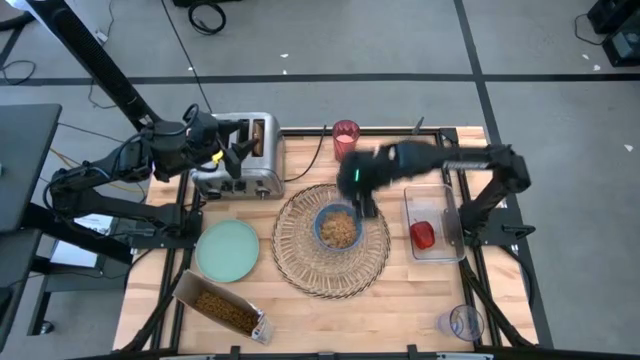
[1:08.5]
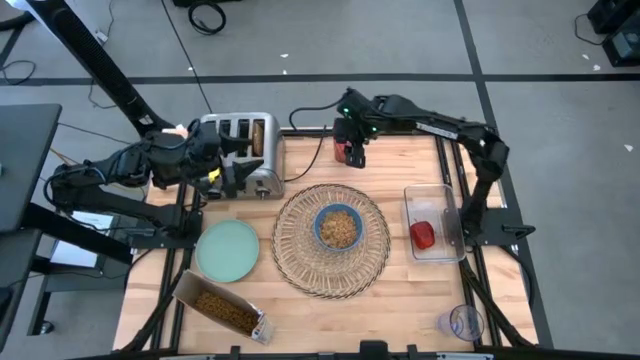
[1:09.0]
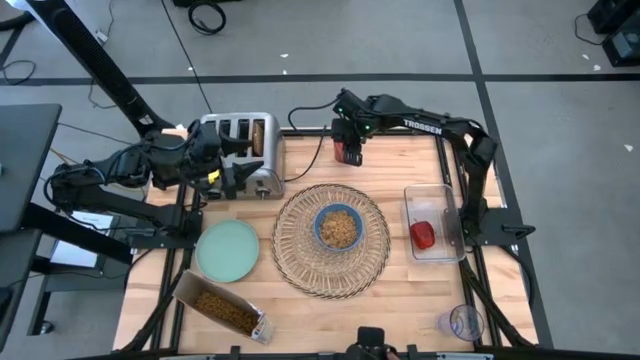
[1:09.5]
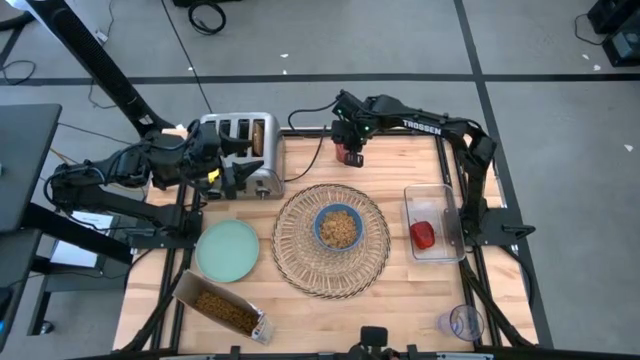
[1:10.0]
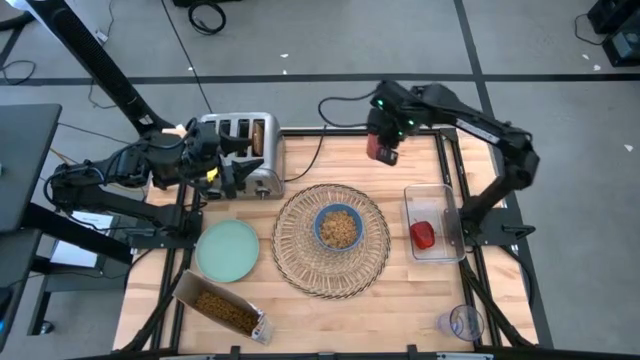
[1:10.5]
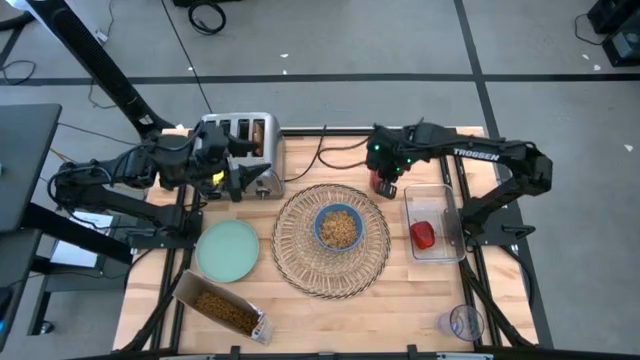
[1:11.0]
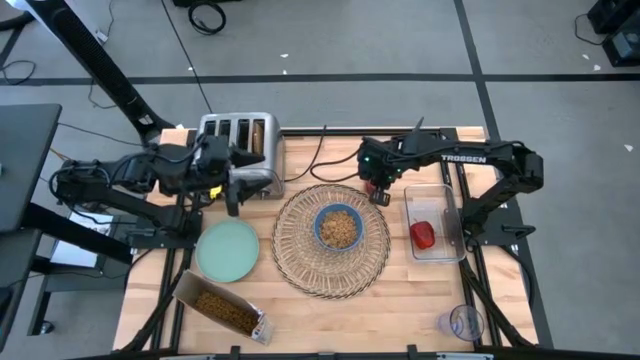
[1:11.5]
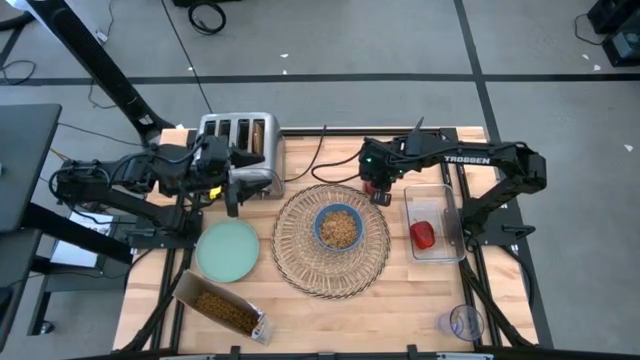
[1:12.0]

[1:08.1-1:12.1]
Task: Arrange a breakfast setting
Put the red glass of milk to the top right of the blue bowl

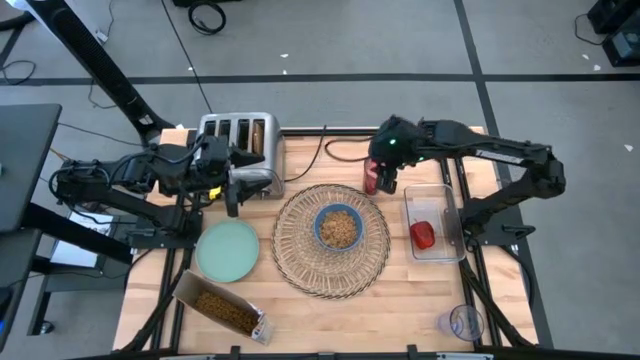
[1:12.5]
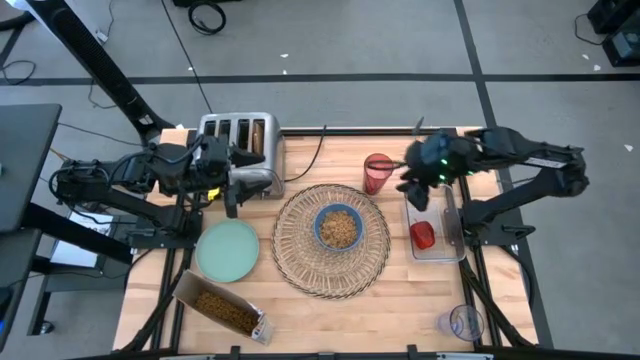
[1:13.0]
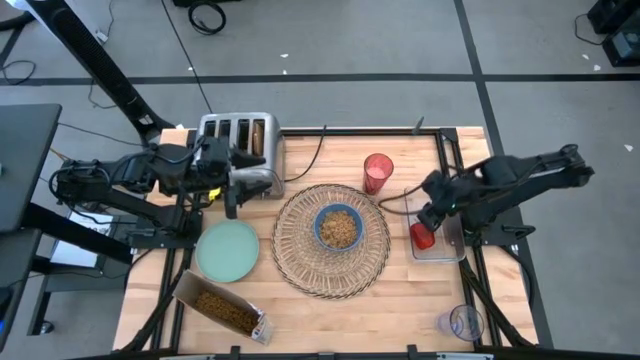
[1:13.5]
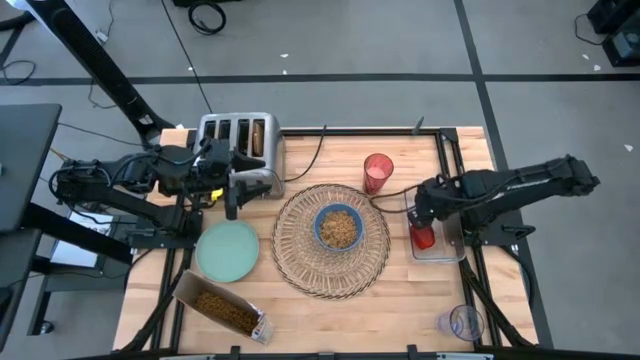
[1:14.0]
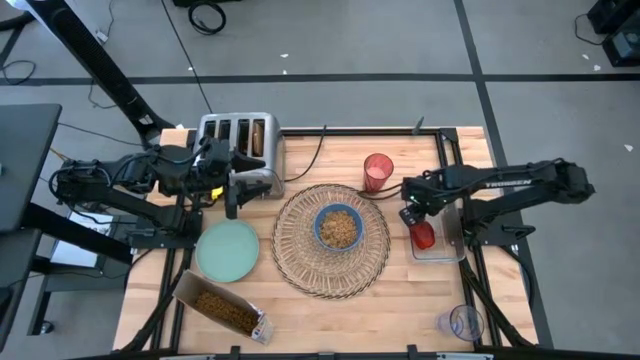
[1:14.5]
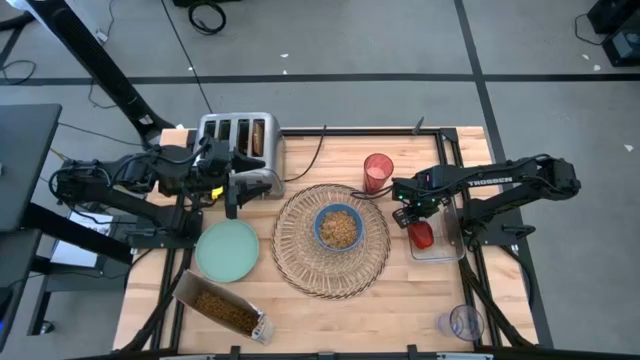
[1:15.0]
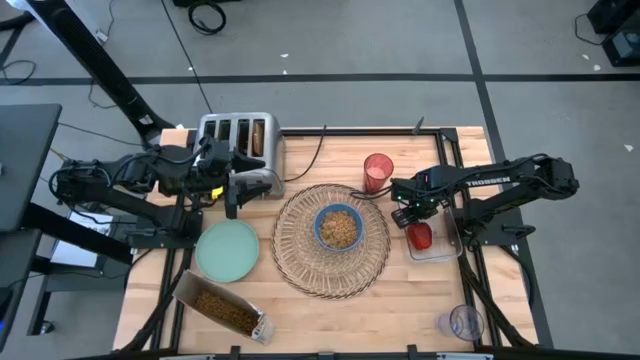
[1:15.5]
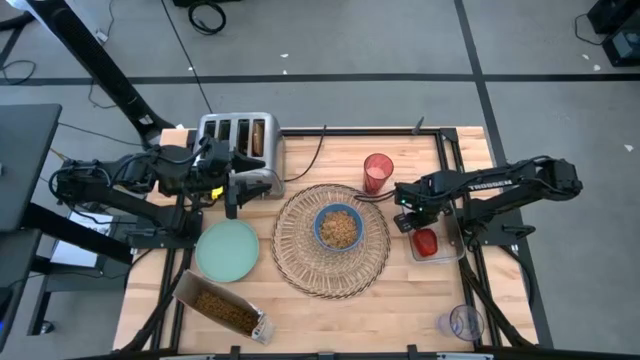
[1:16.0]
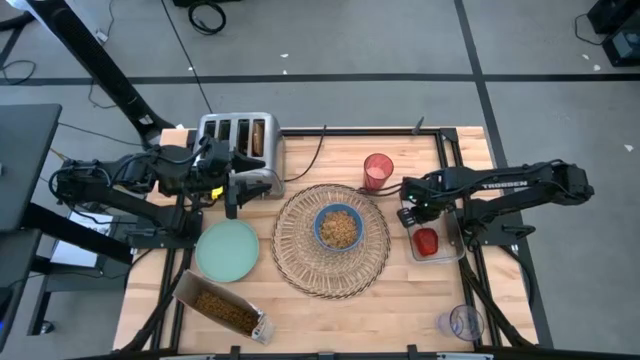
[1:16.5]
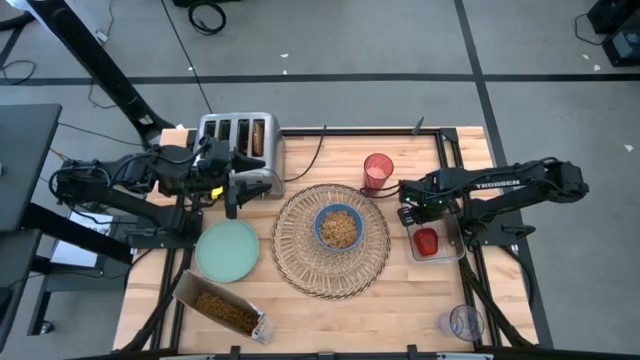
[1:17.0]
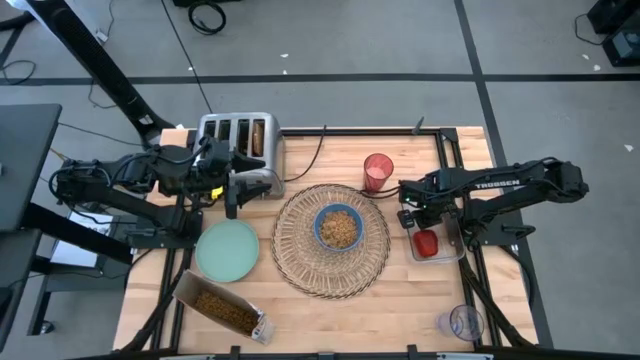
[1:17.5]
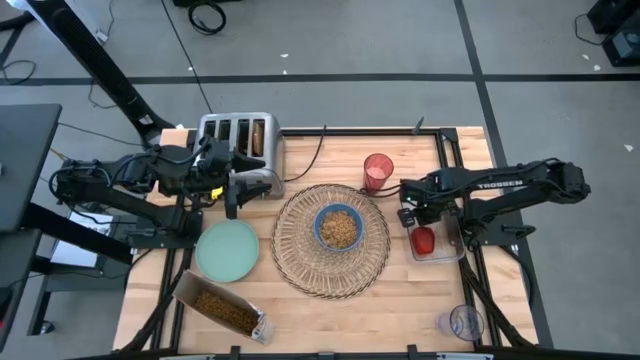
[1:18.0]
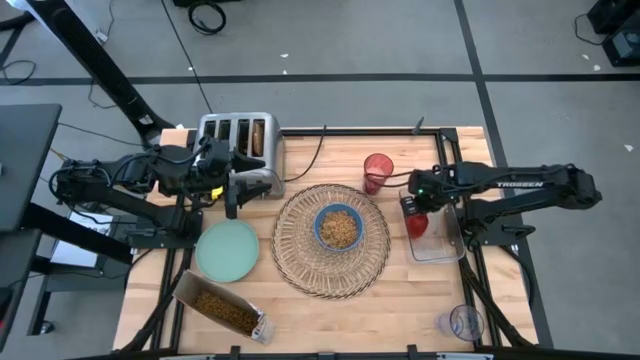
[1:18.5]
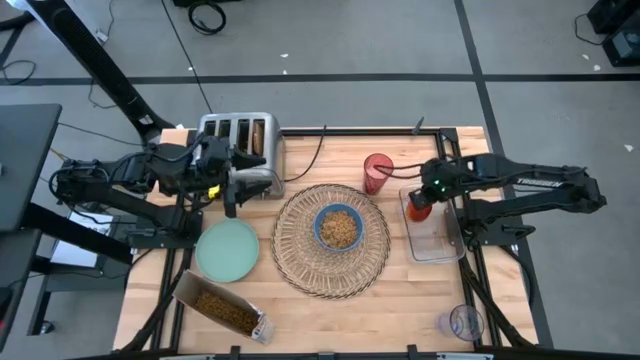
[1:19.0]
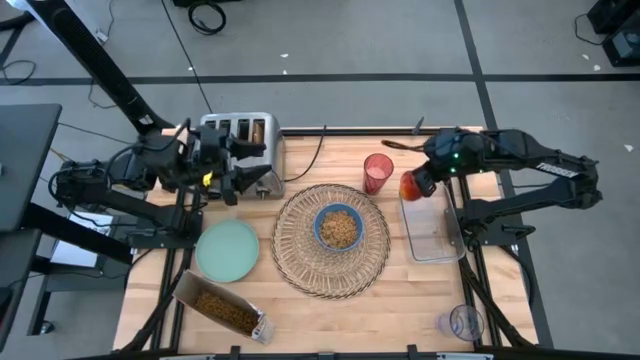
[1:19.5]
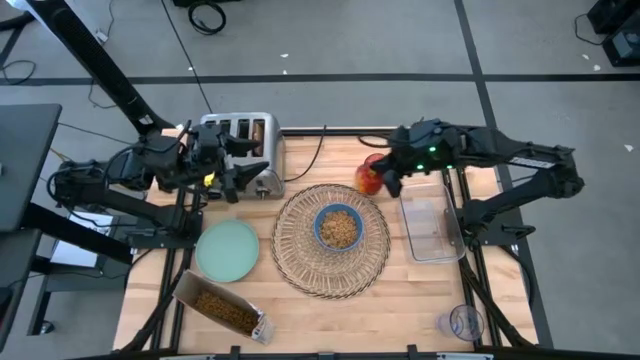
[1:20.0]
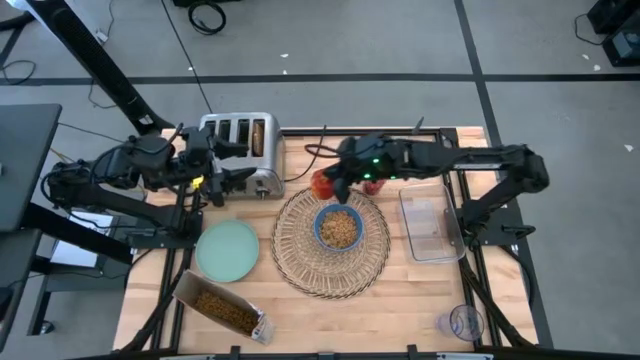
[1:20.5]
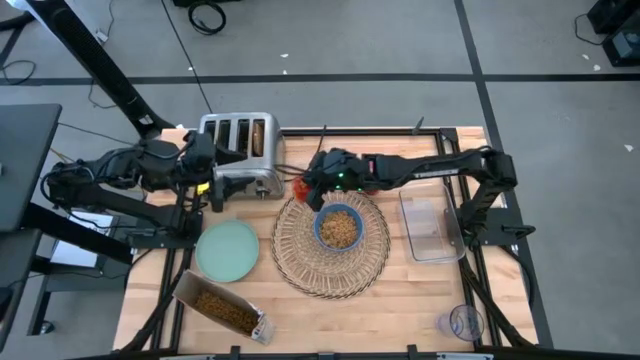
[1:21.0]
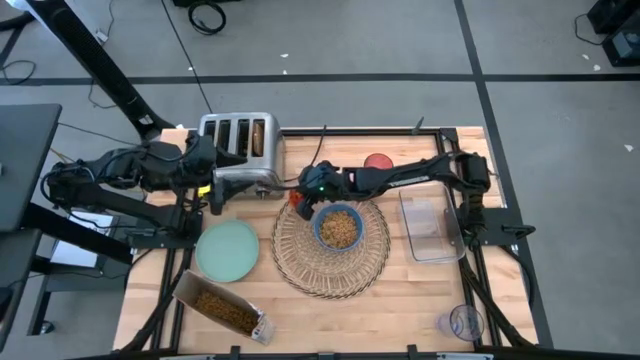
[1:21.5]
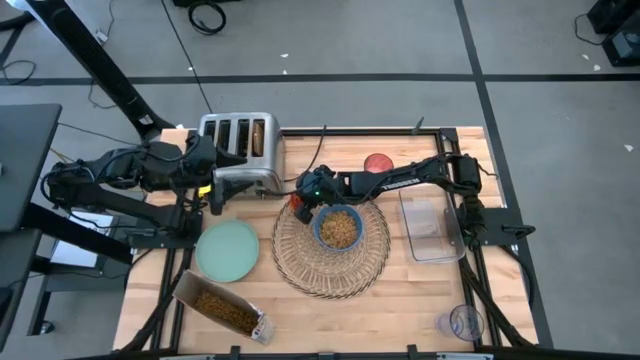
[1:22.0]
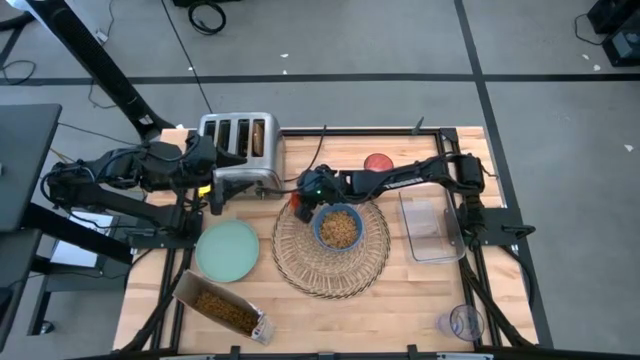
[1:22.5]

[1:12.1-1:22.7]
Put the red apple to the top left of the blue bowl

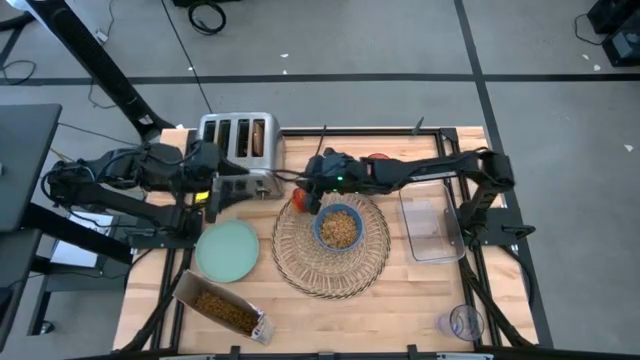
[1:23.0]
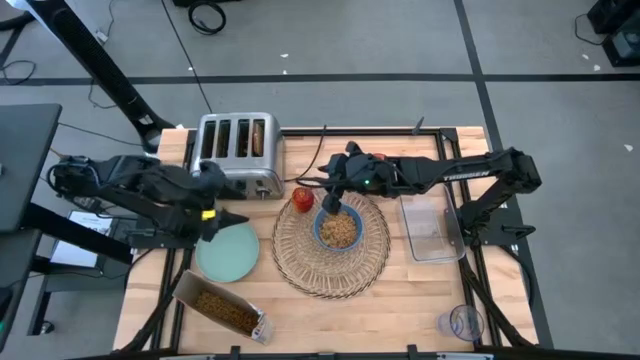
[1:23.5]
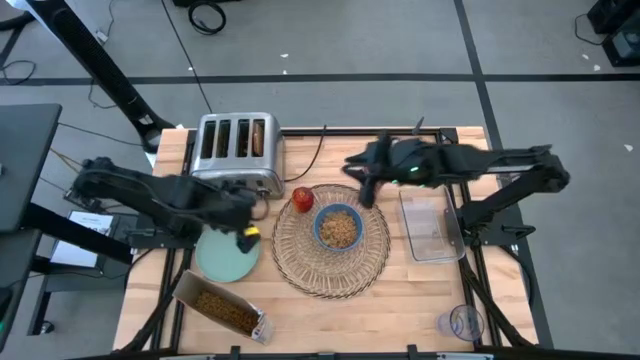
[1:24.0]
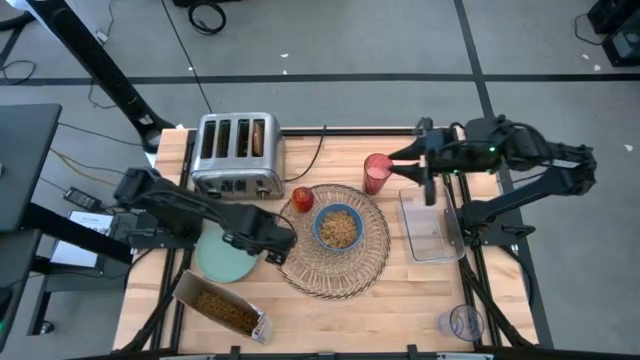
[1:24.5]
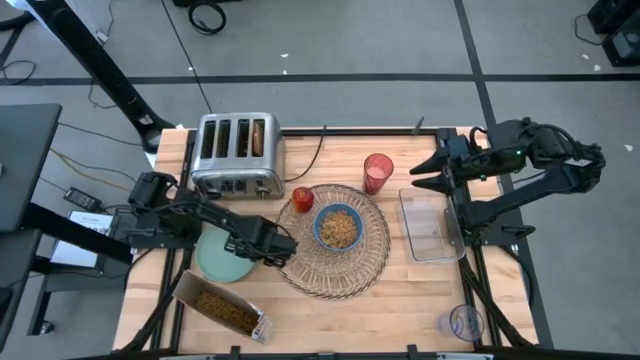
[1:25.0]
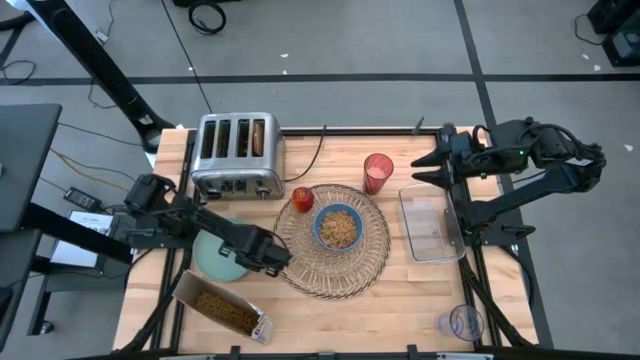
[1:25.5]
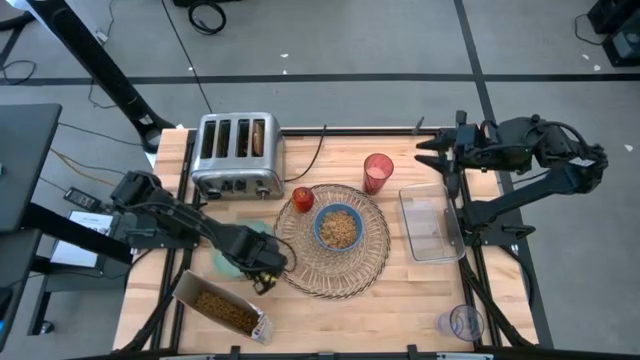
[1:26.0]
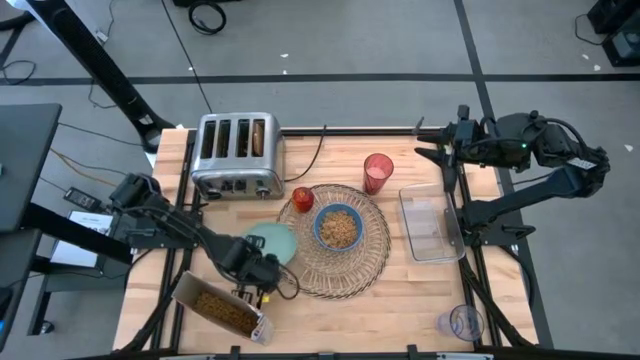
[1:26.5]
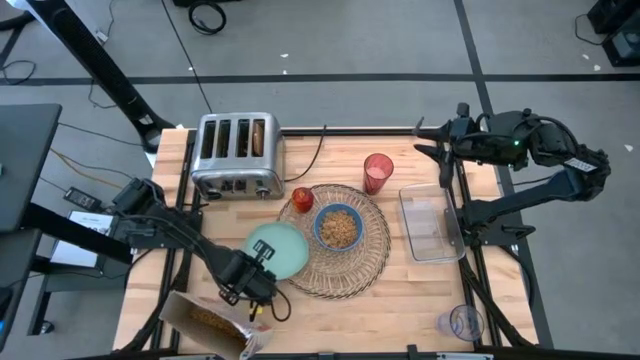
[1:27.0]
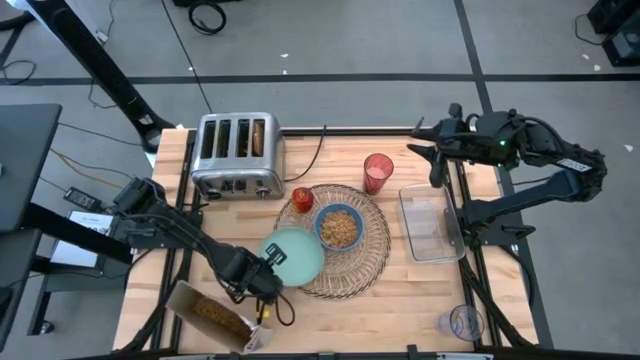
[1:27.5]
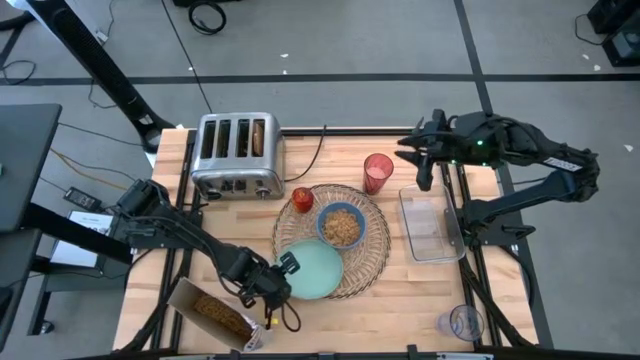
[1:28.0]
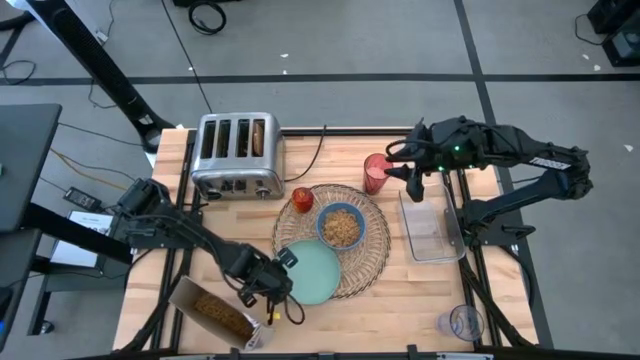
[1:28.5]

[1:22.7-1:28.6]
Put the light blue plate on the brown mat to the bottom left of the blue bowl

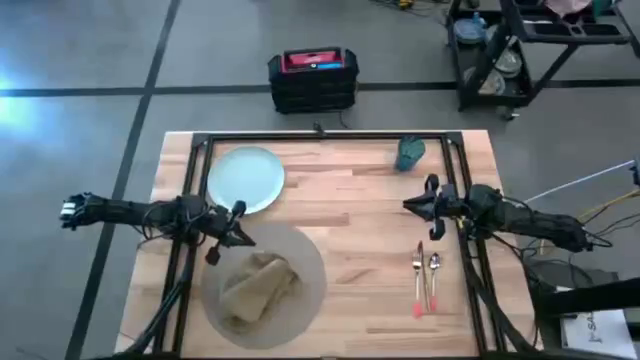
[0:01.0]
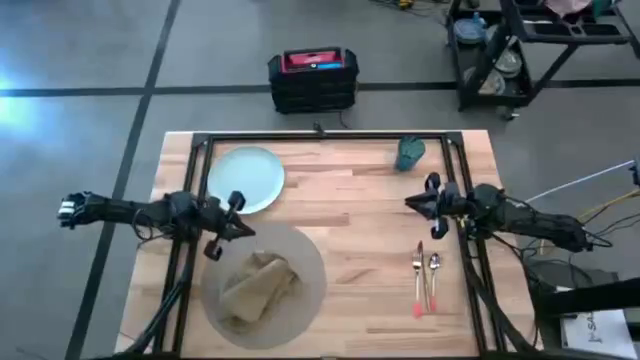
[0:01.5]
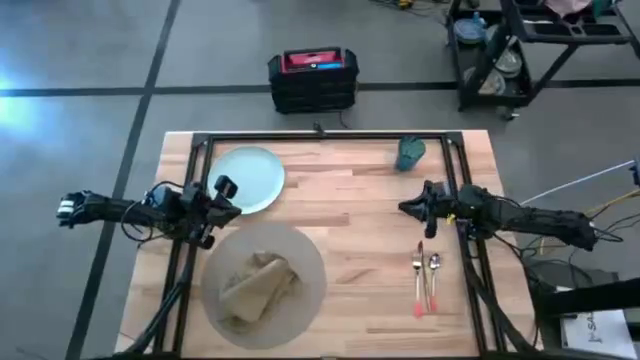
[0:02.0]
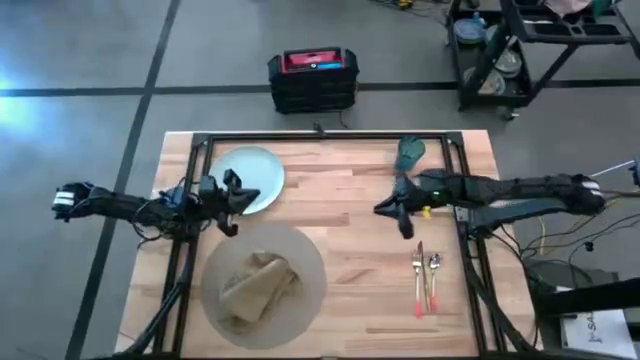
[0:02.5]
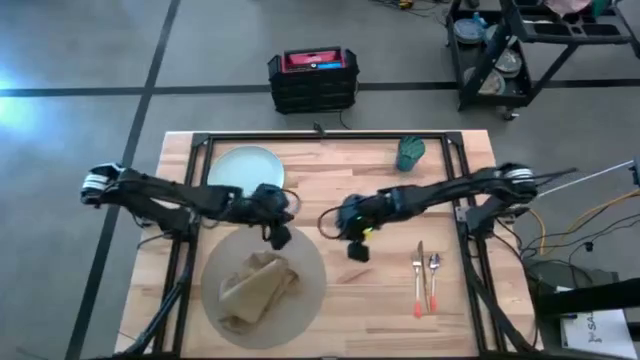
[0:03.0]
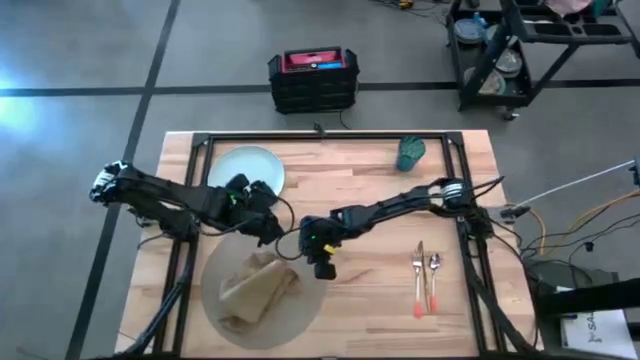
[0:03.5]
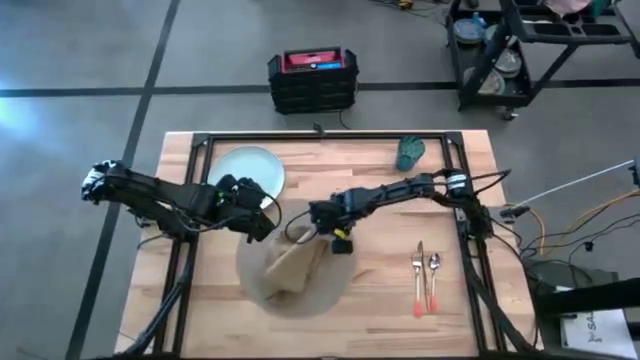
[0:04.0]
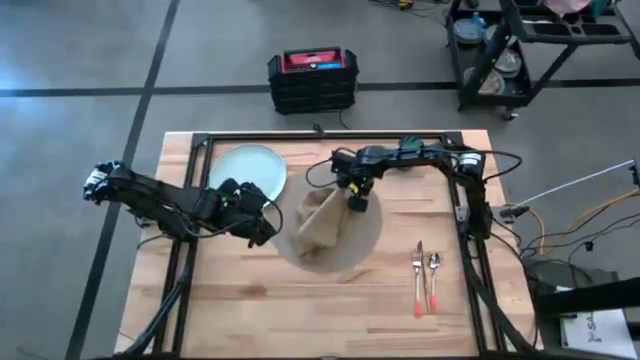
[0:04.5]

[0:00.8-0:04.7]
Task: Set table place
Move the table mat to the center of the table
